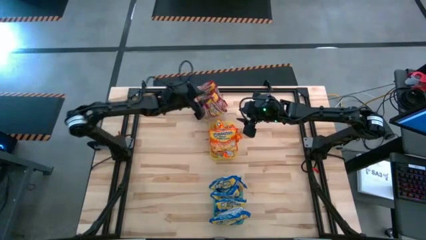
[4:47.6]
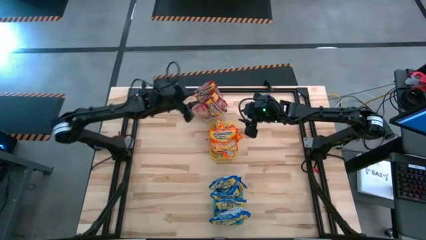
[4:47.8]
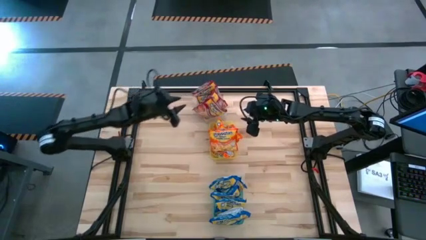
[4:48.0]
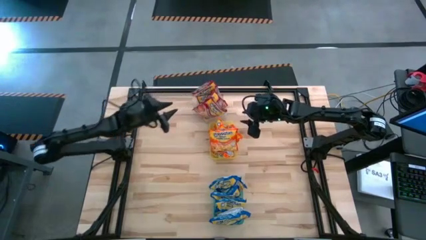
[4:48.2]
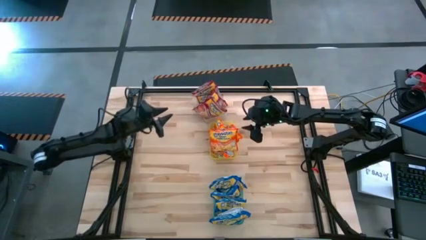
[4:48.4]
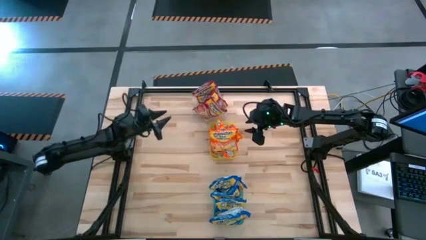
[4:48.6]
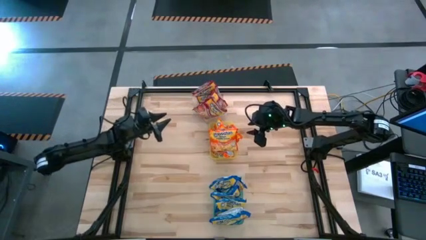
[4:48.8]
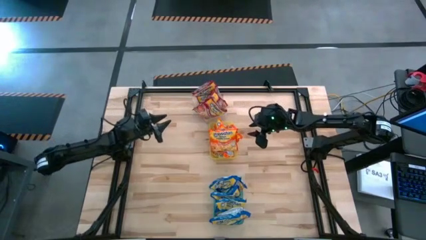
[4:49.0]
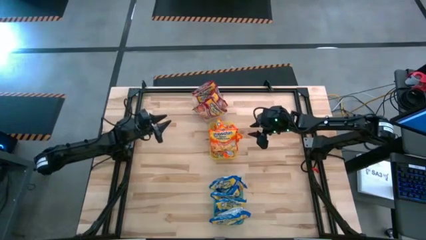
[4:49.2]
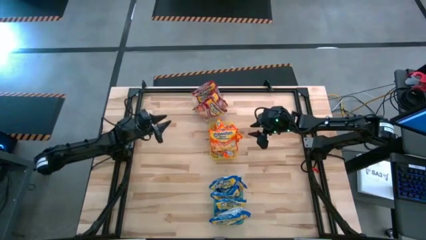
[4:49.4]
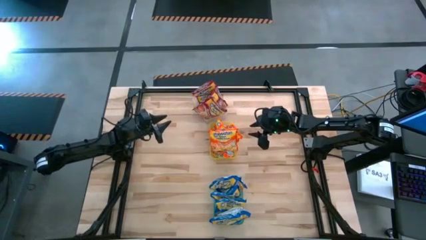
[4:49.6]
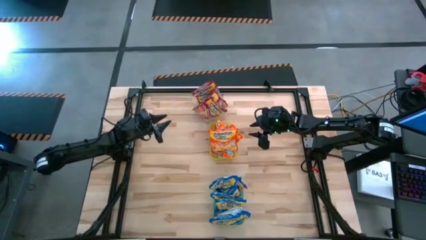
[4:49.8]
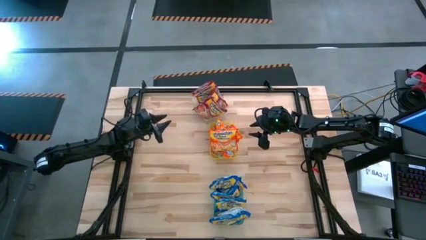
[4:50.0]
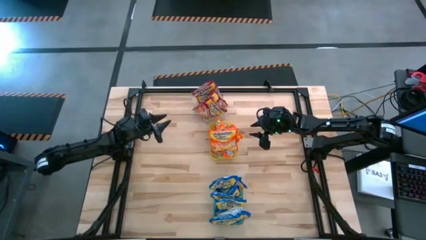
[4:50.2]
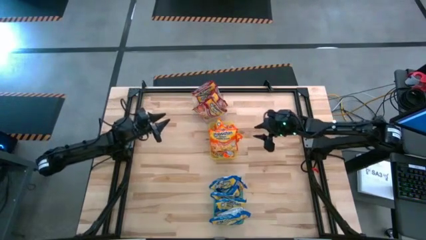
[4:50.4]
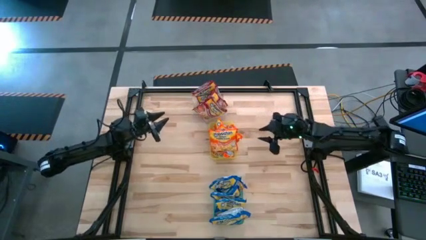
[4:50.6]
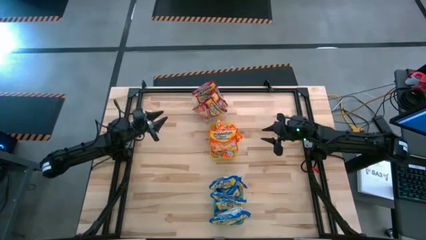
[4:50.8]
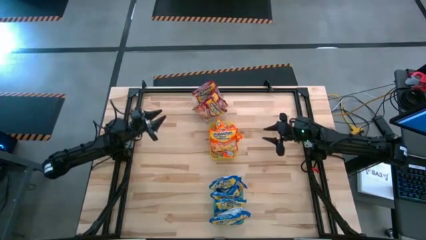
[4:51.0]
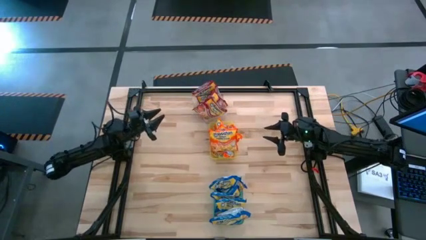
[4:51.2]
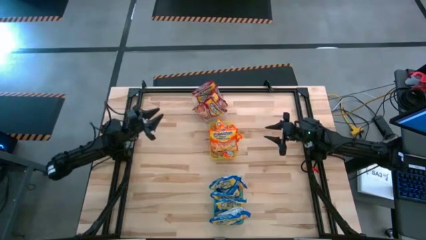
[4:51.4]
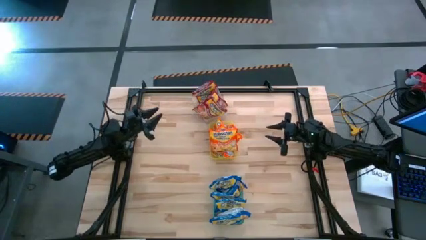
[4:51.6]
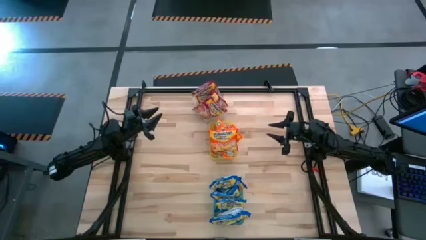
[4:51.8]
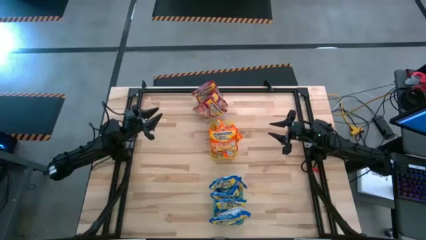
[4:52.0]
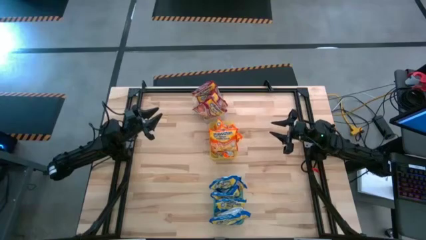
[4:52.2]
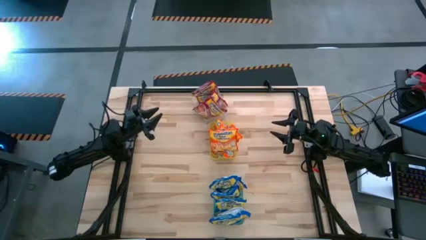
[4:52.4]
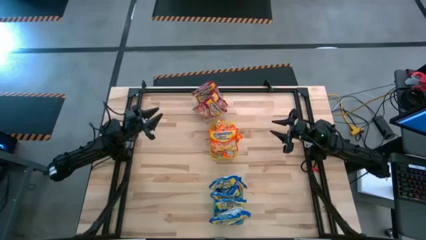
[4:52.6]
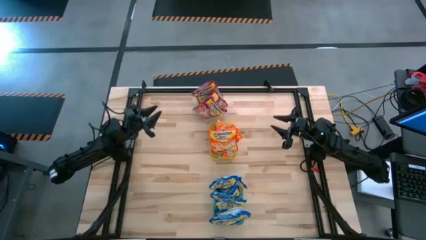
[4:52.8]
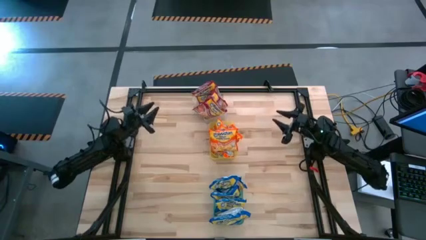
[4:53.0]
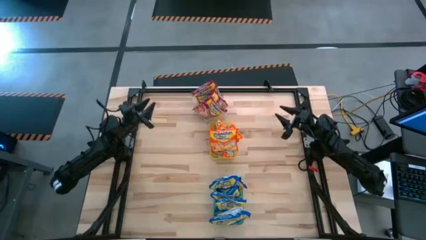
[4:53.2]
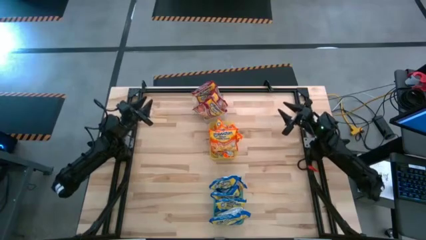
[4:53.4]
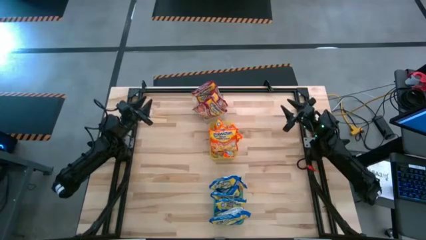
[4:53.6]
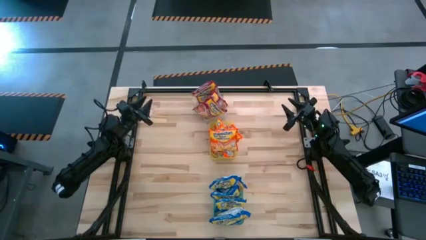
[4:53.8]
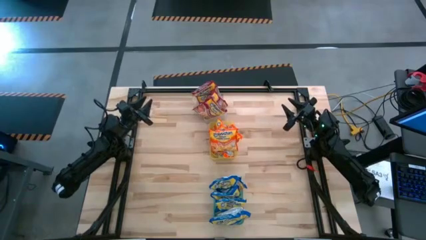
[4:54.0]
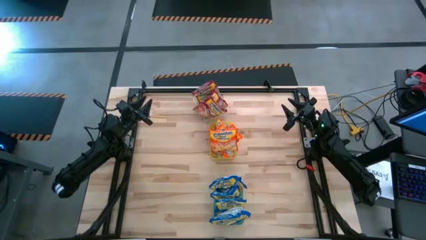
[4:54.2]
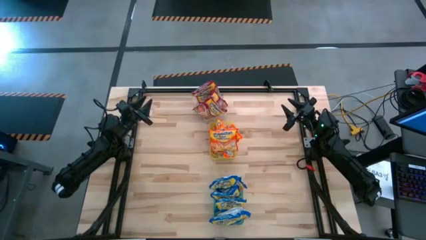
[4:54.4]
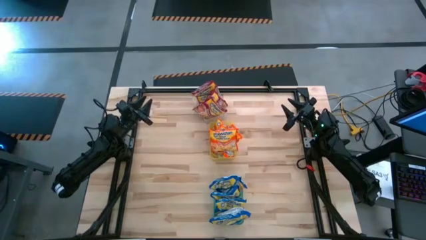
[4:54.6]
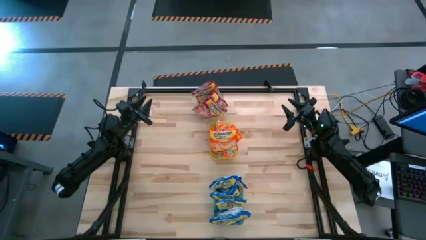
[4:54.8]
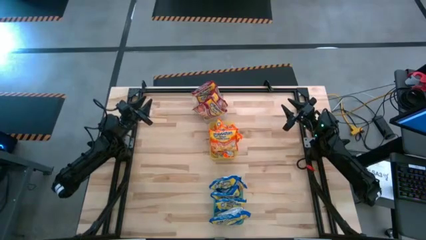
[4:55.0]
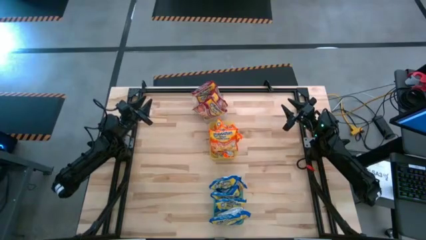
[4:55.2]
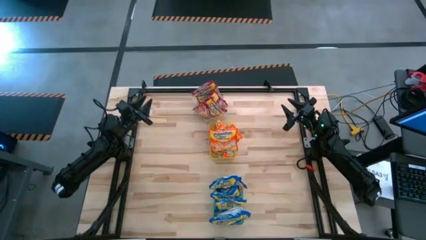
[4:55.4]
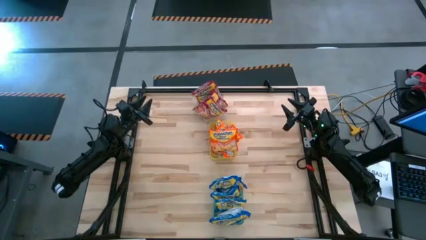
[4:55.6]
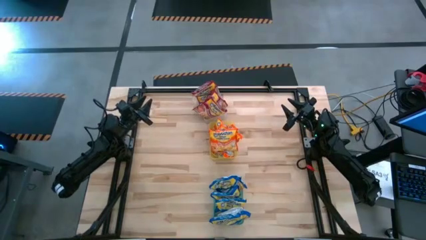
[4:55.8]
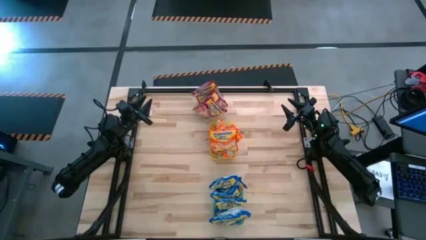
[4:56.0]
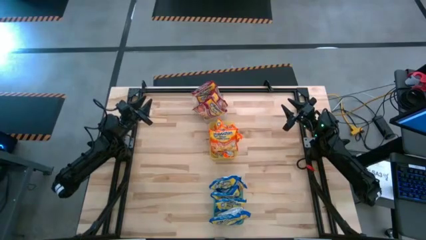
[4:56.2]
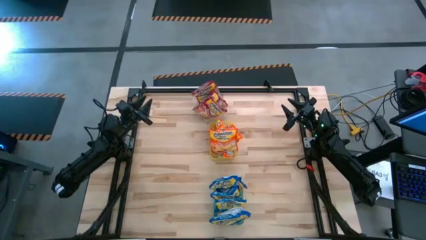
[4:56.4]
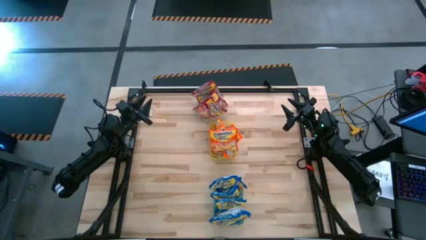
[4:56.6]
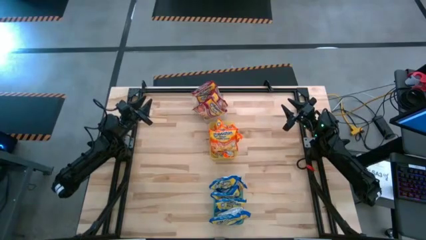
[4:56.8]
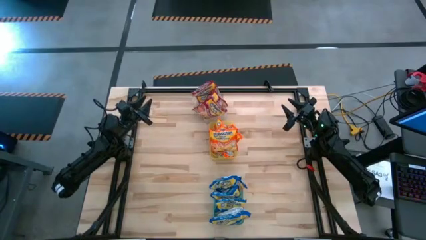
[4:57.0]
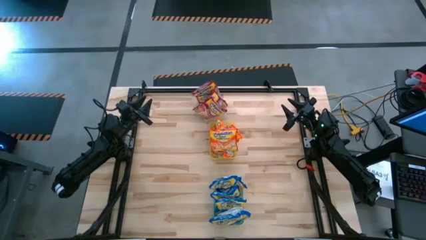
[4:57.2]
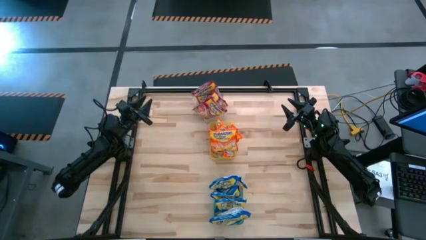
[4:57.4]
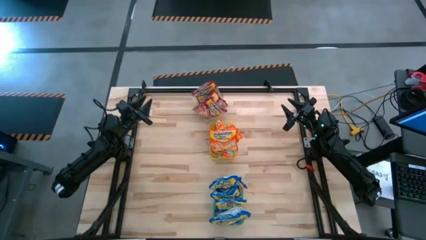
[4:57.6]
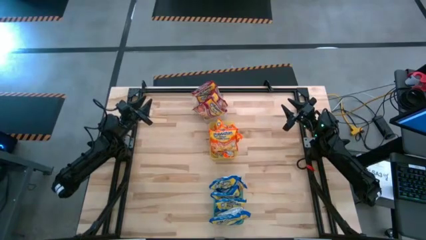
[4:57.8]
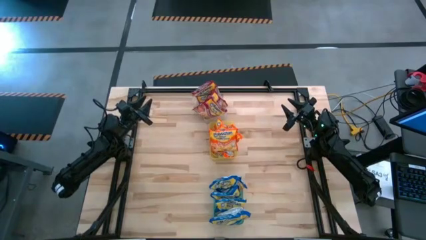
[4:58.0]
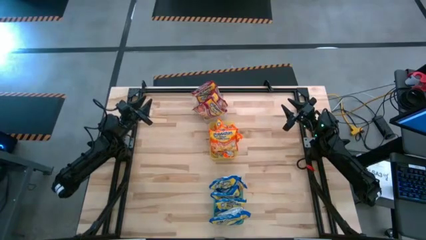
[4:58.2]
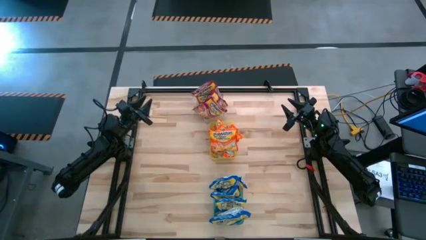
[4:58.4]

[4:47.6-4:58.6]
Task: Sort Maruchan noodles
Return to Home Position

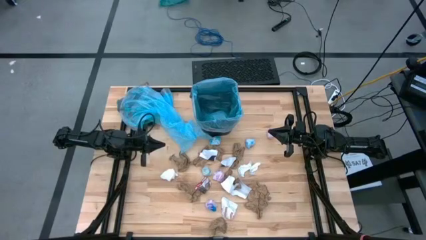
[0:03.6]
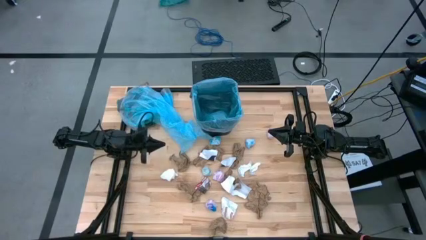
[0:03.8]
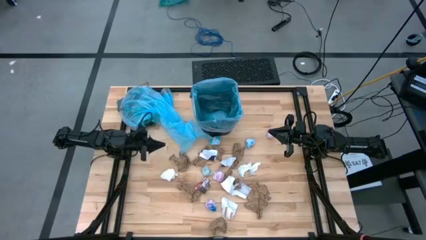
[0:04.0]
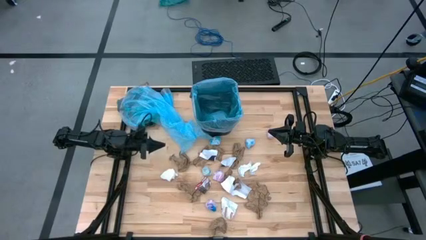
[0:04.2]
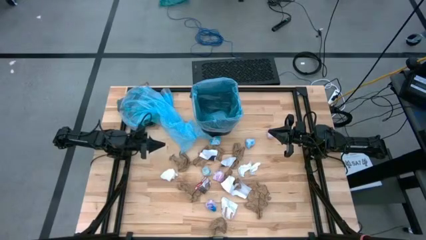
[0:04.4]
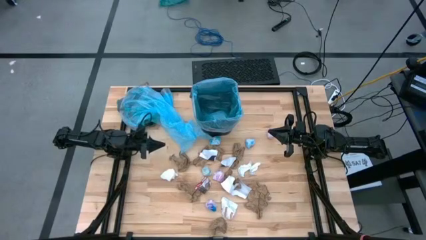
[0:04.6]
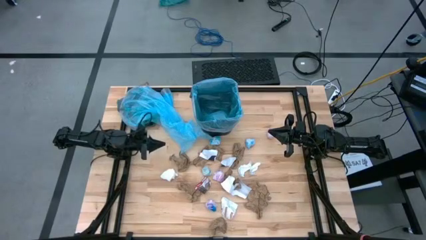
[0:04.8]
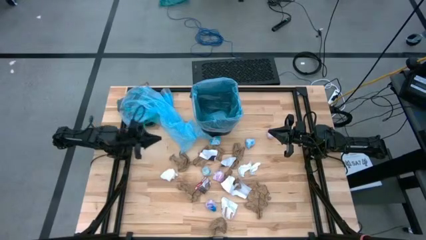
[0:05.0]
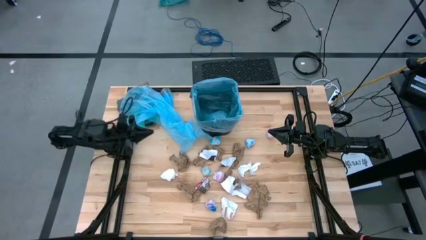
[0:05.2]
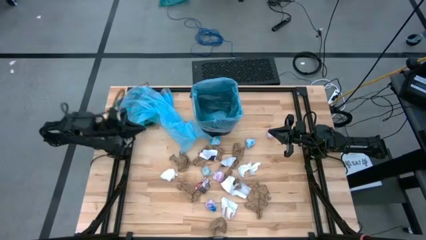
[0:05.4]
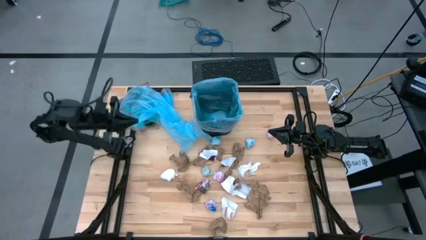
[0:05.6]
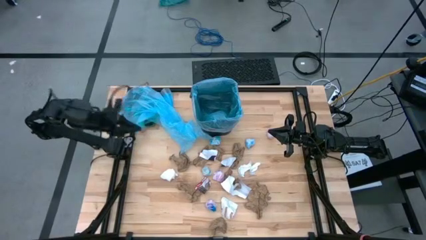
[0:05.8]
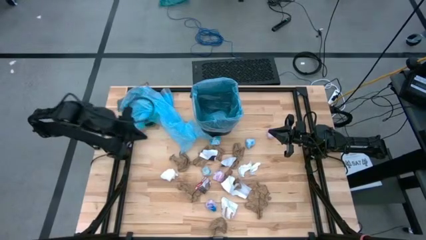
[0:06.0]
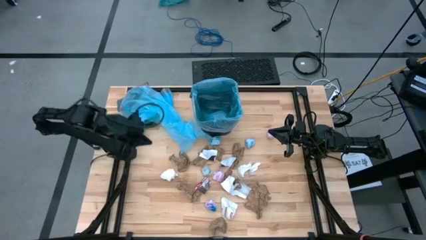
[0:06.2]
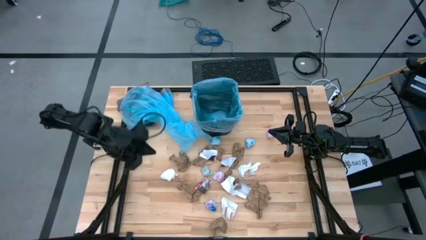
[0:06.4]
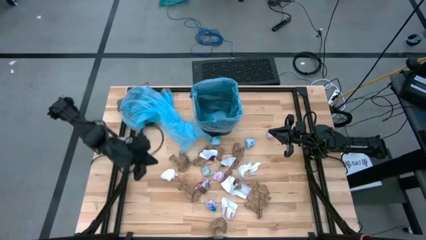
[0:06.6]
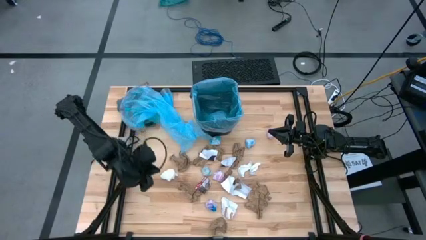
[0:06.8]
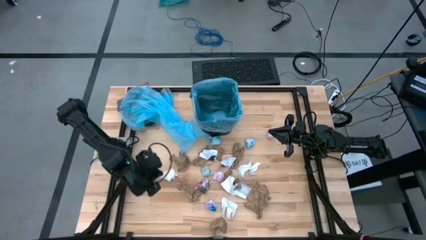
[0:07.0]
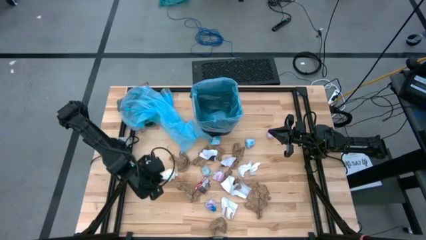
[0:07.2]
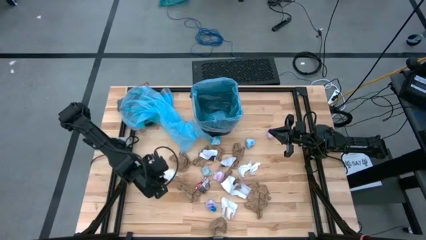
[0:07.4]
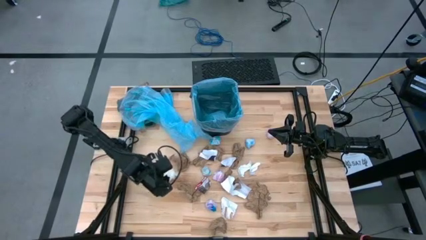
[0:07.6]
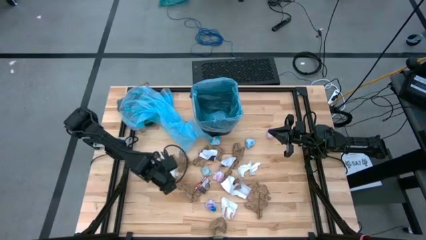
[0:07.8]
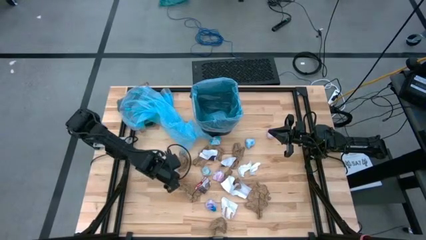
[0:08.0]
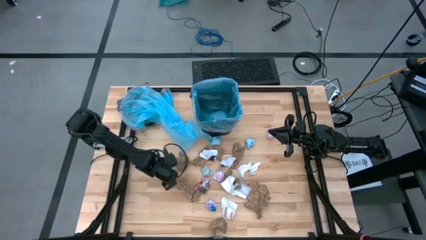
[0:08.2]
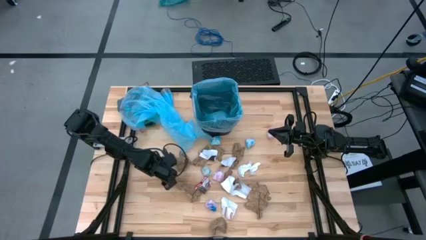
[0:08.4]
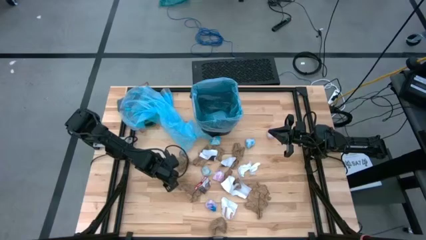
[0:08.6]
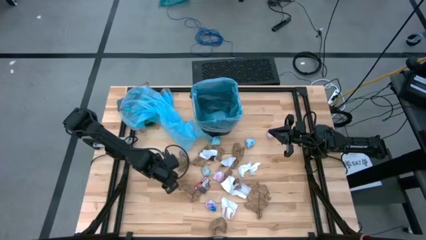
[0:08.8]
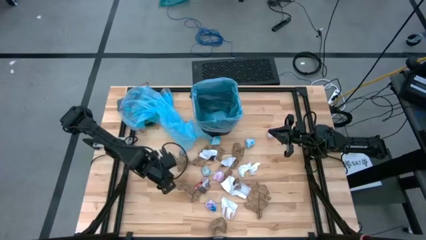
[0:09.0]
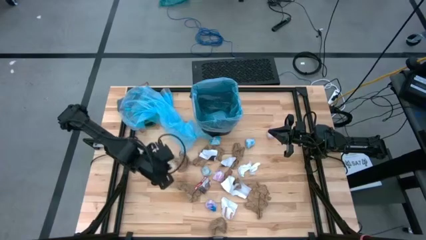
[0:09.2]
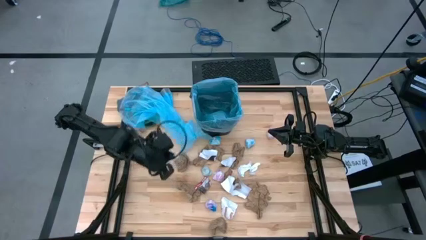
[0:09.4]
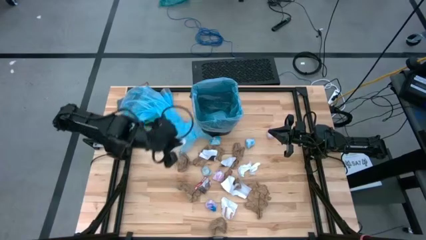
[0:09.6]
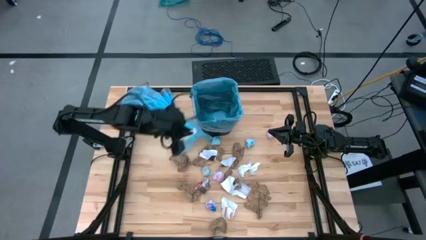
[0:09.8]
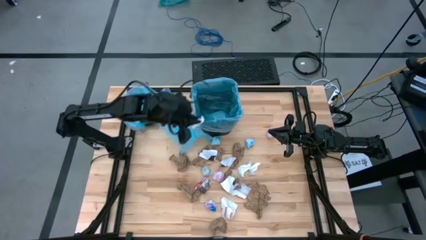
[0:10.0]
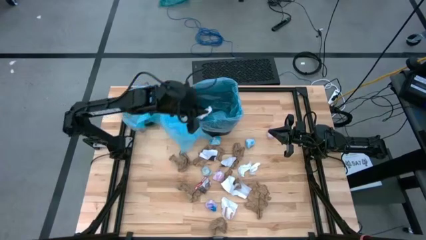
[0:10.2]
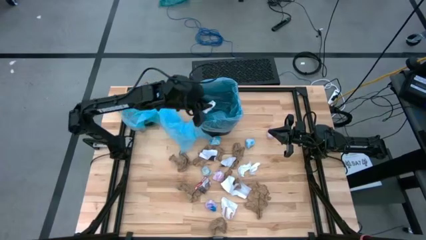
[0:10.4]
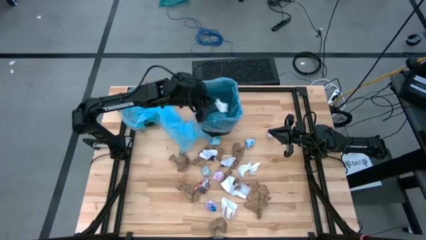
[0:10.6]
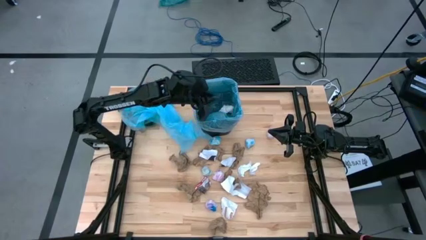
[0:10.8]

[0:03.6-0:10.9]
Task: place trash/remove bag and relplace
Put the white napkin into the trash bin
